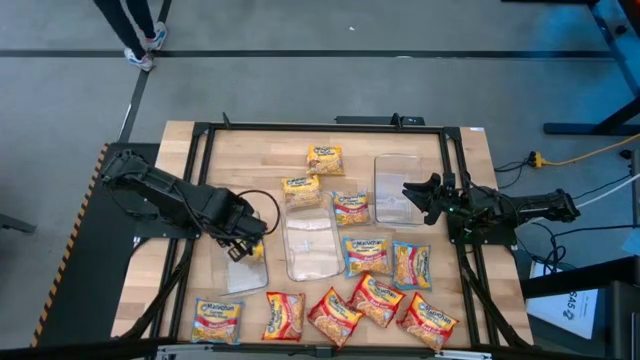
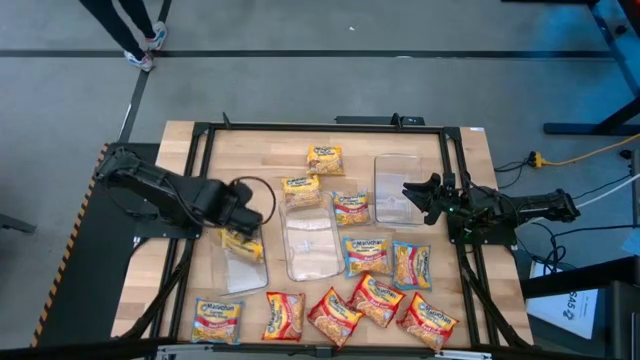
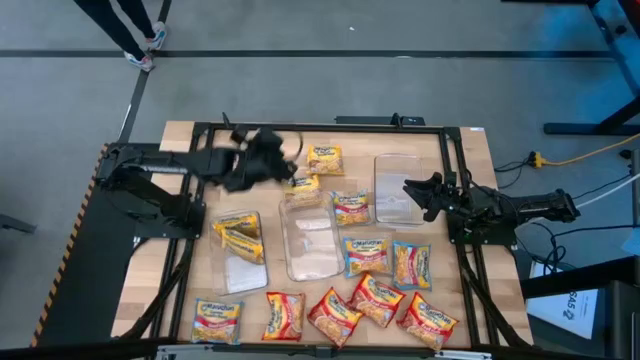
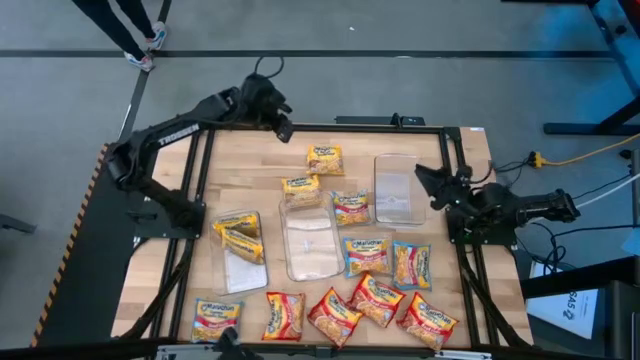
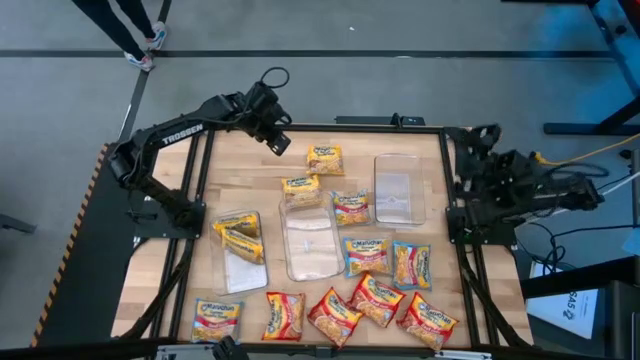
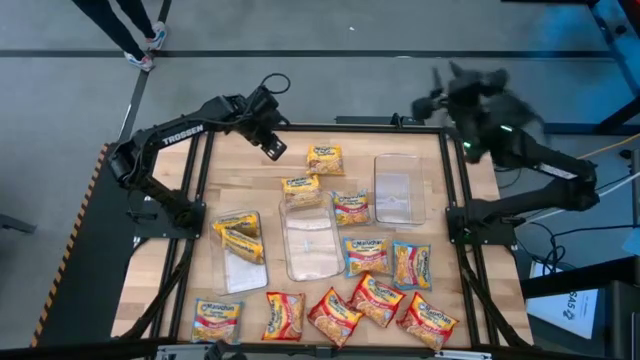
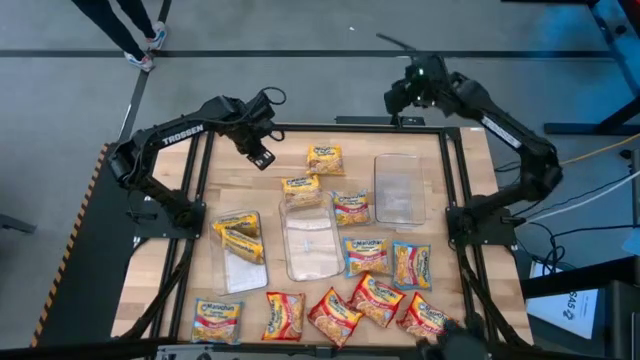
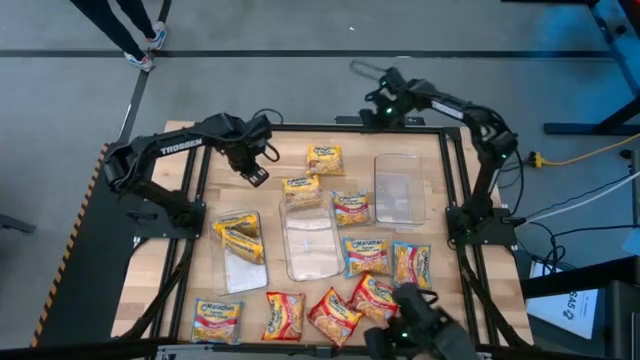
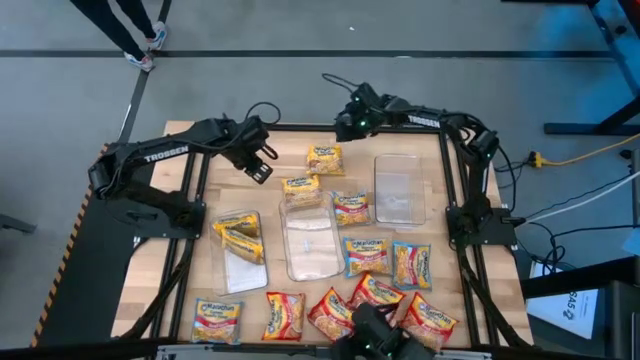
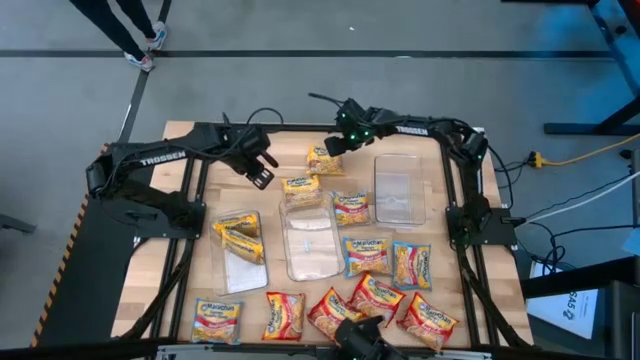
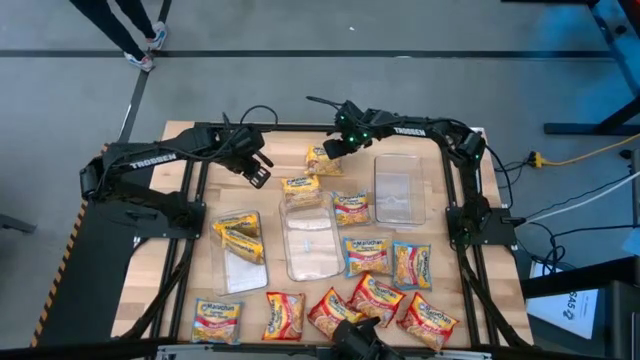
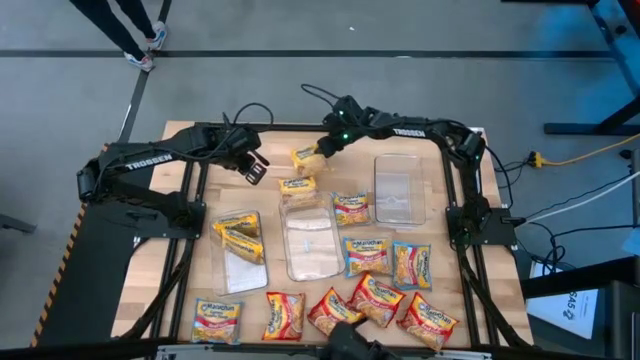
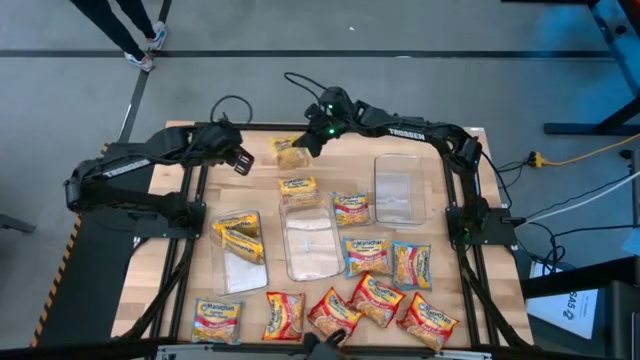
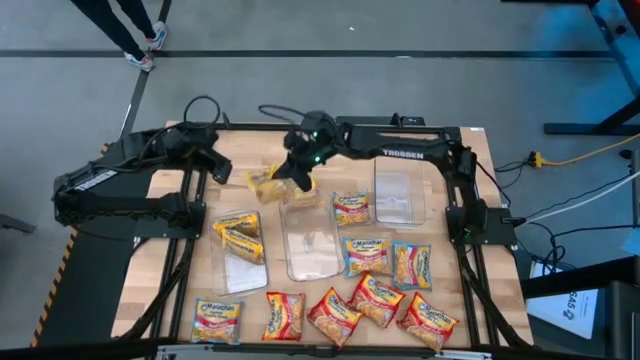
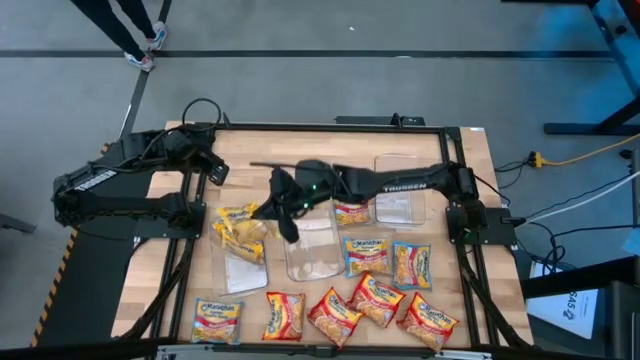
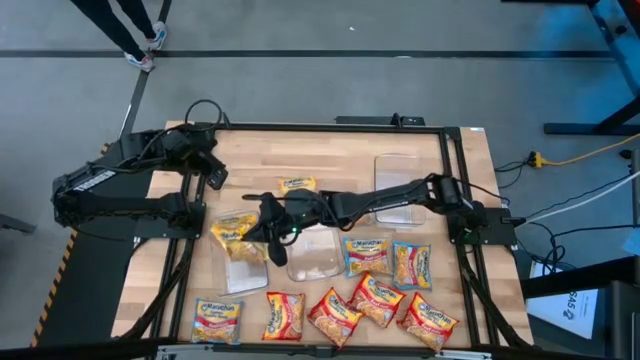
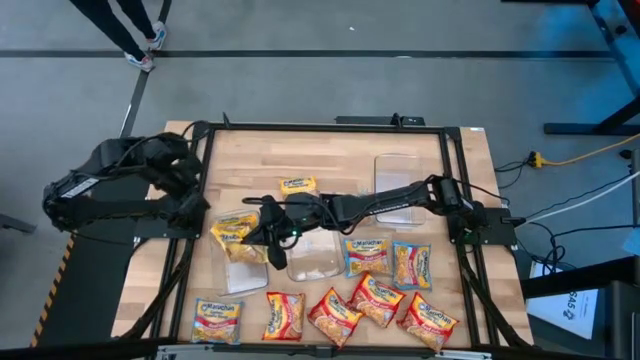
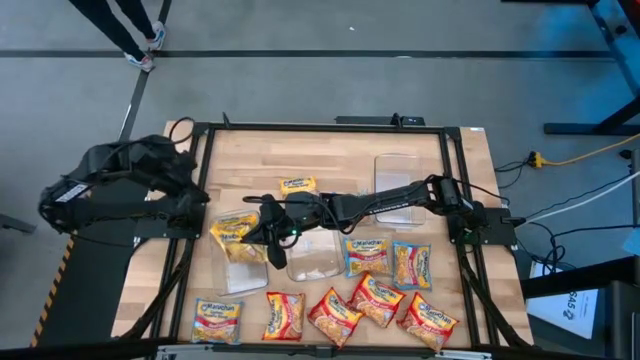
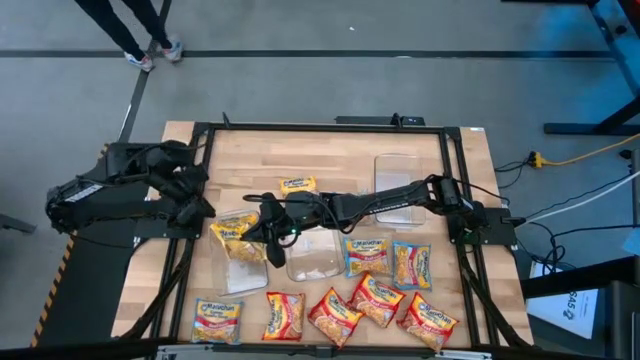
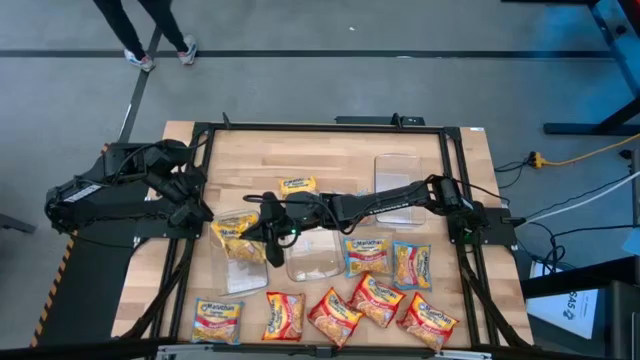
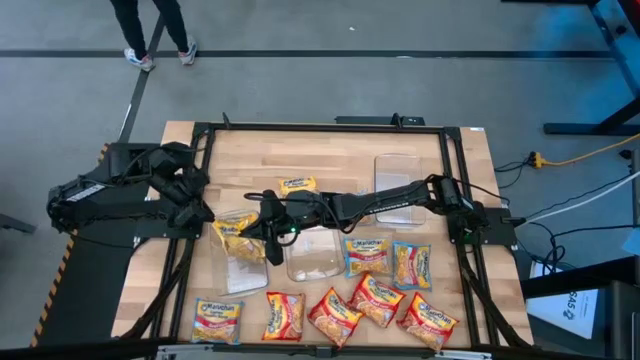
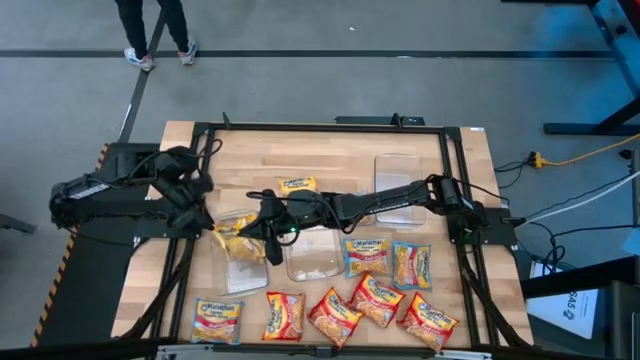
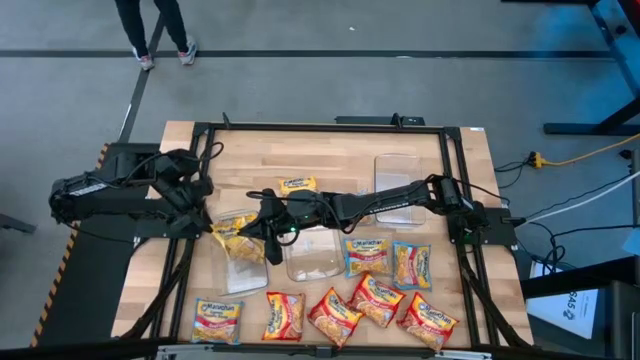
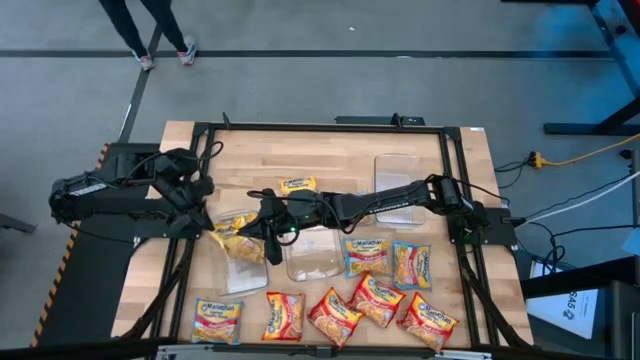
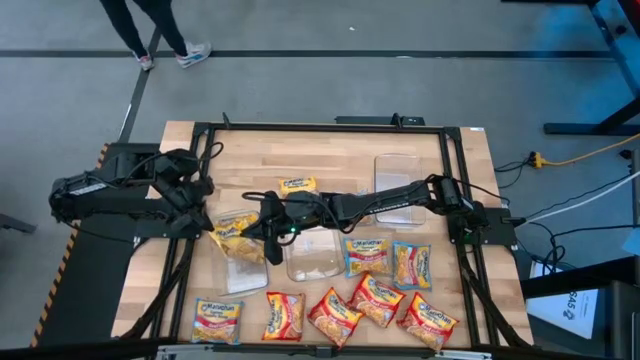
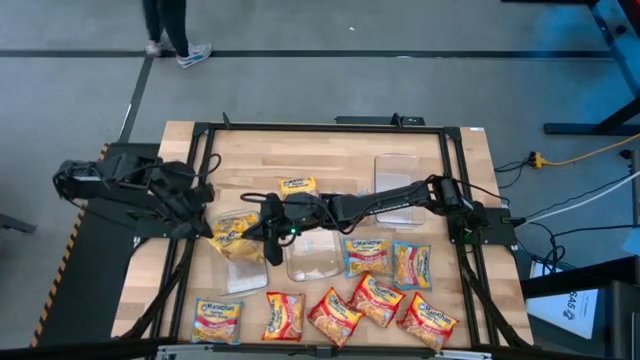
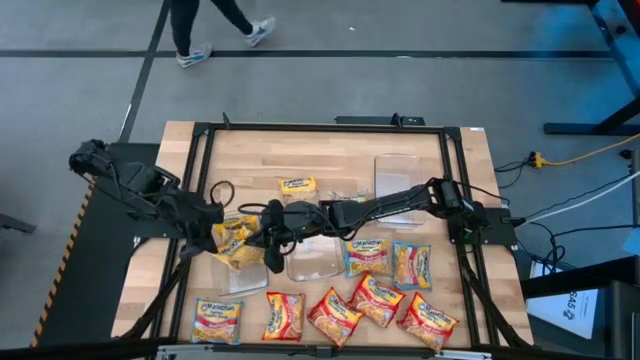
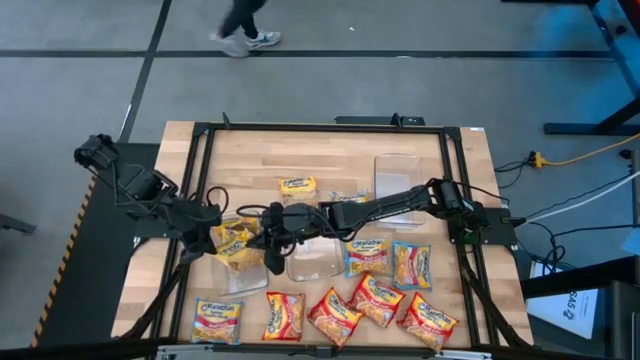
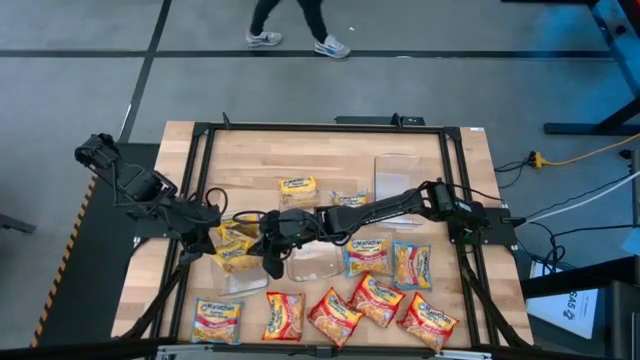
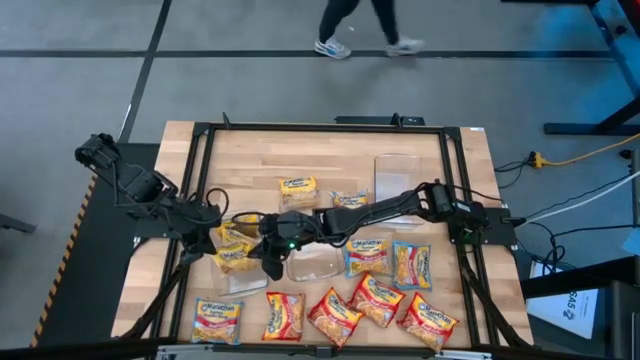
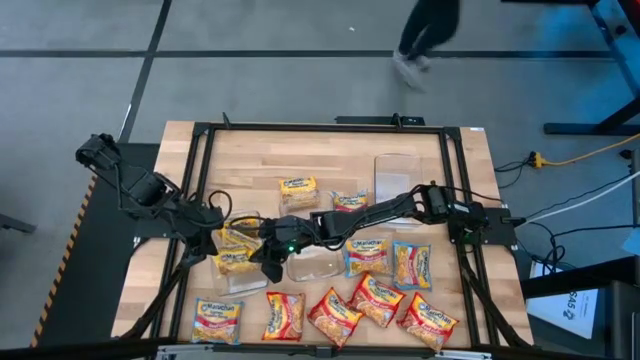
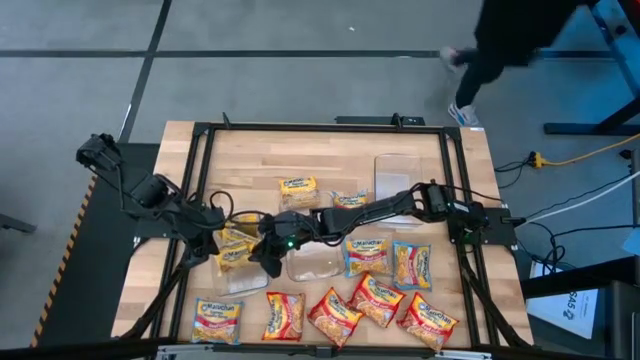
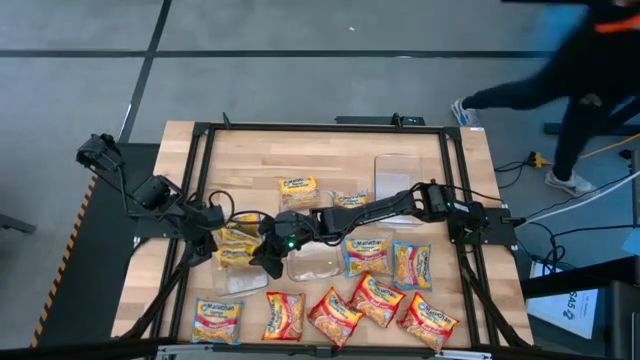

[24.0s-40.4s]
Task: Sort Maruchan noodles
Put the yellow noodle pack into the left transparent bin

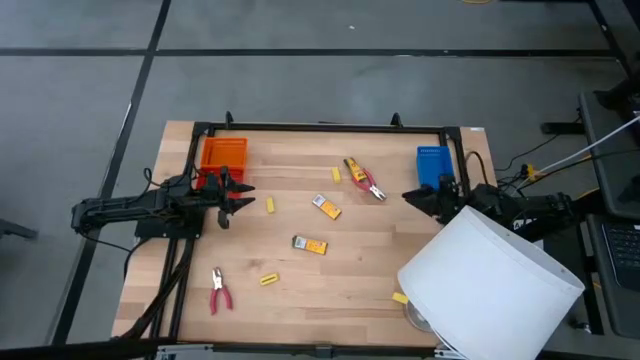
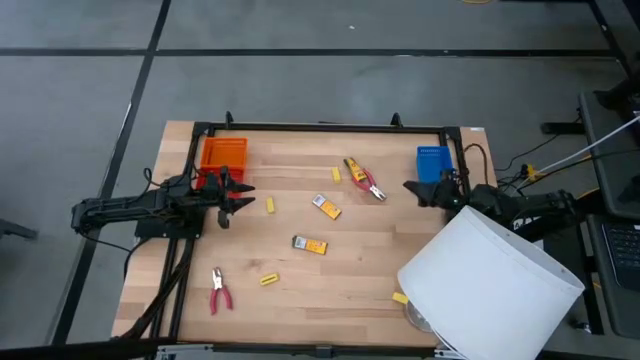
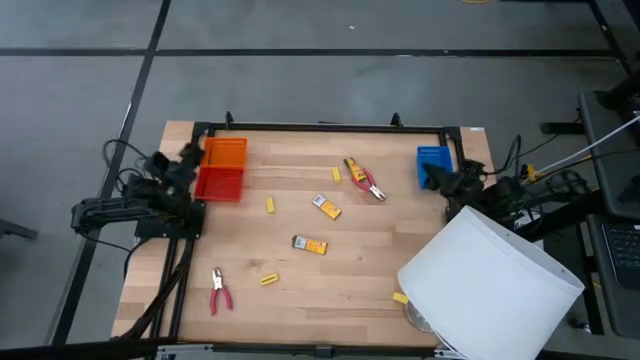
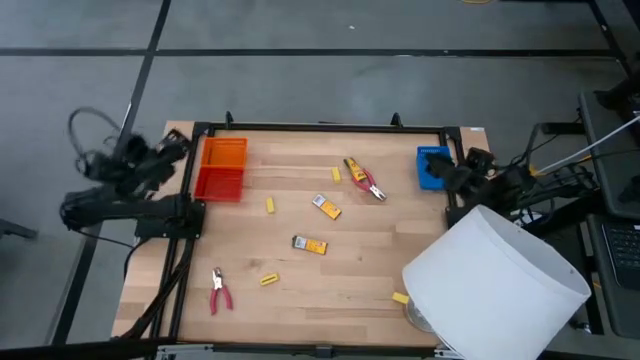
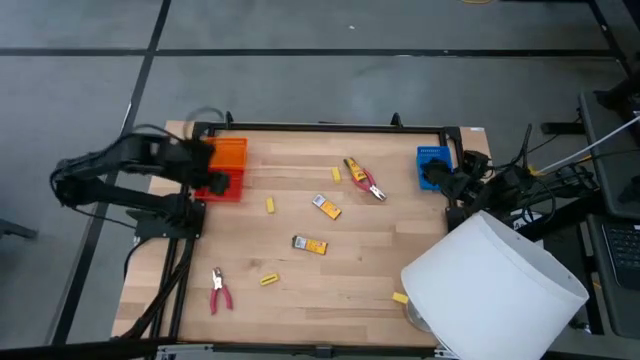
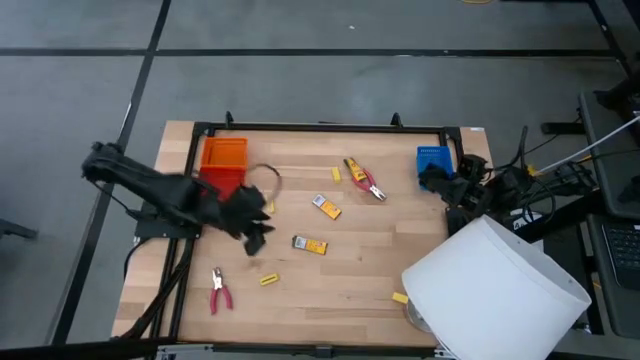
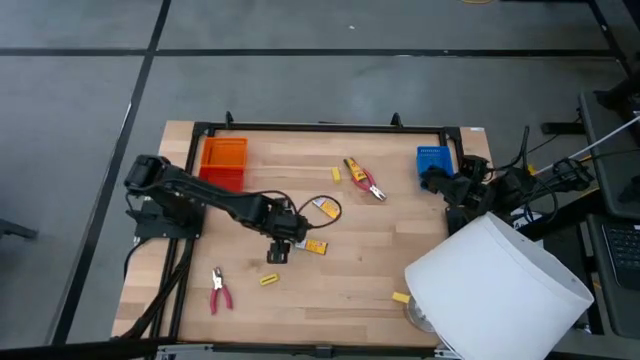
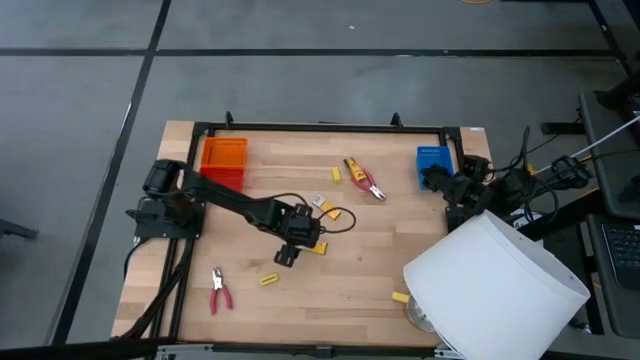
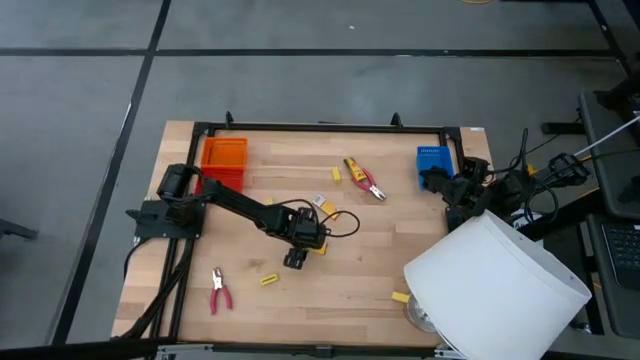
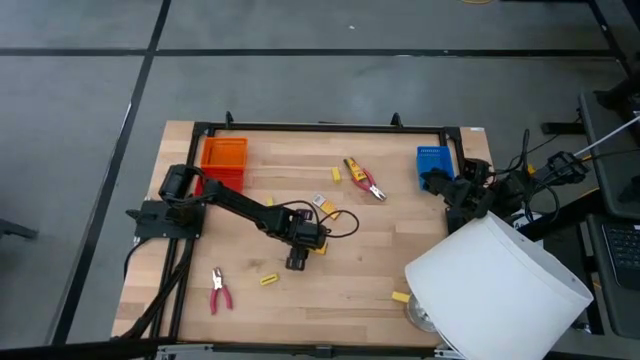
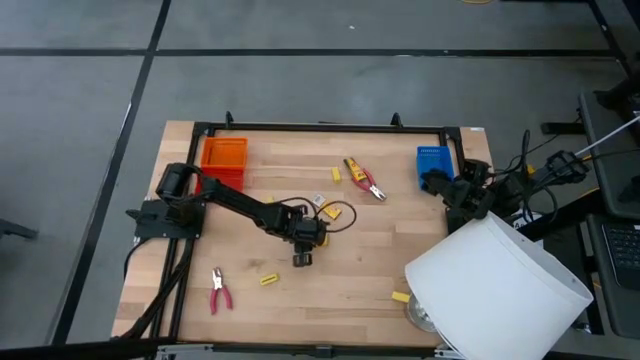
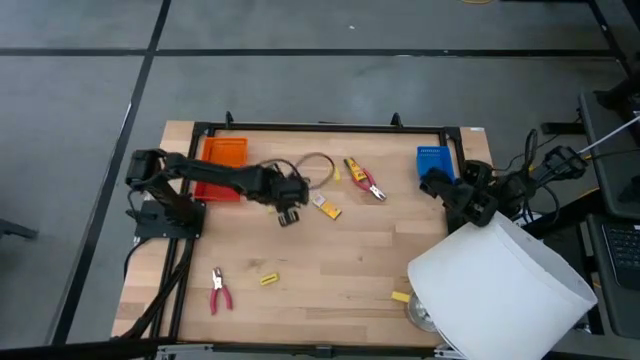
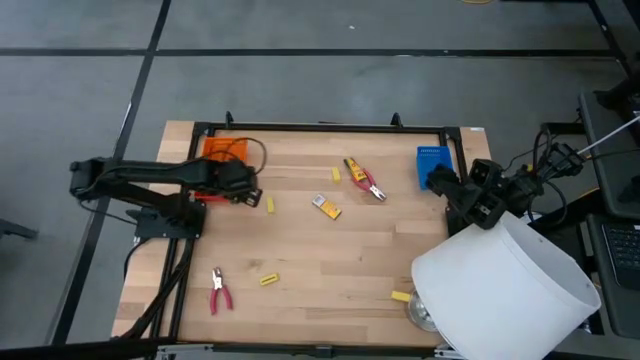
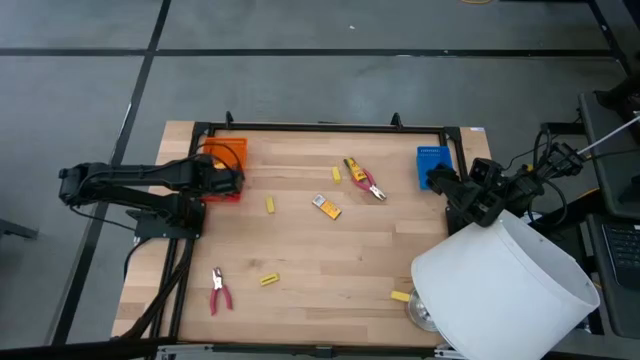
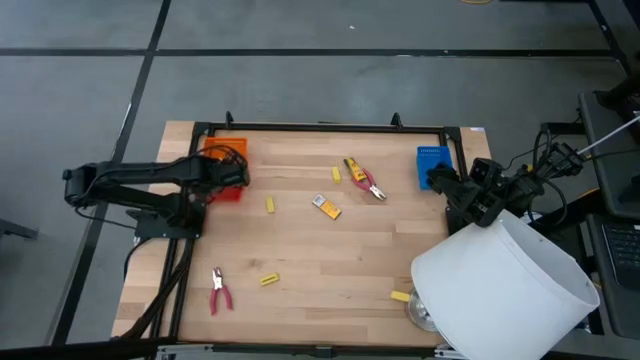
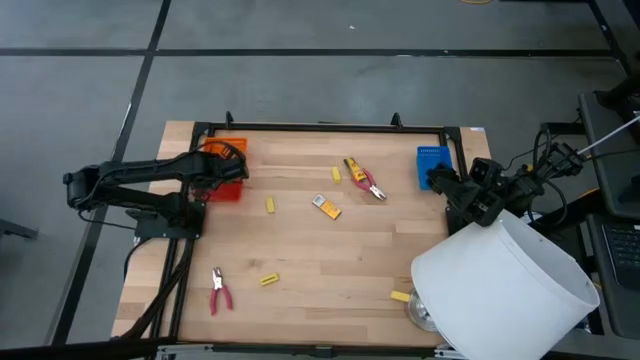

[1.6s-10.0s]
Task: Pick & Place School Supplies
Put the bottom left yellow crayon box into the red bin
